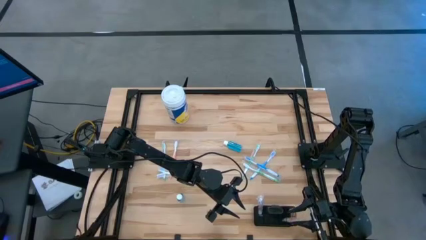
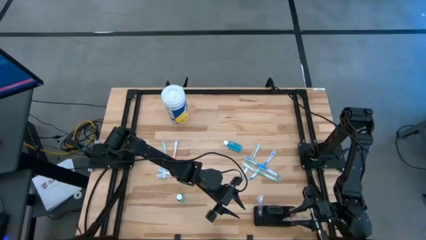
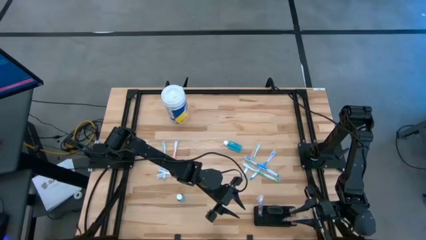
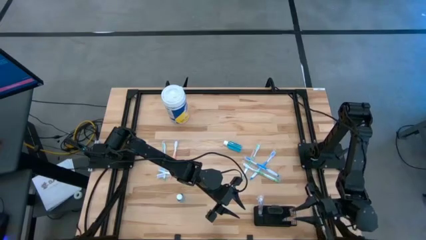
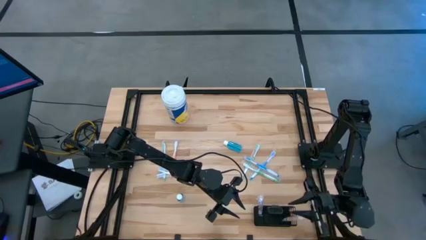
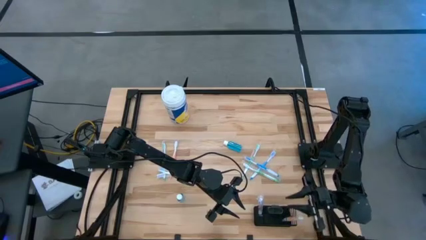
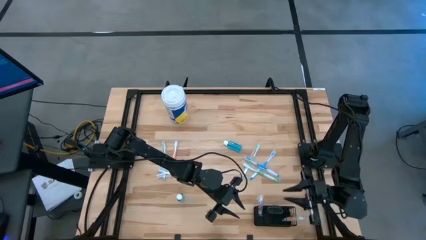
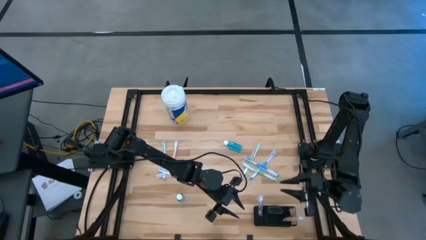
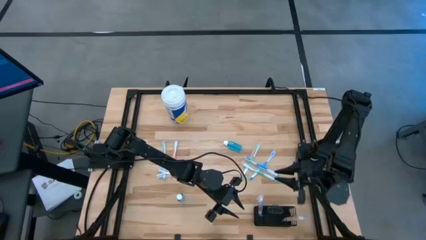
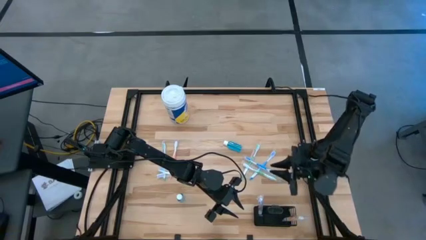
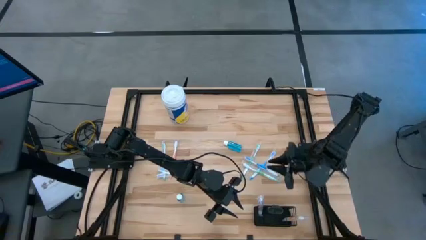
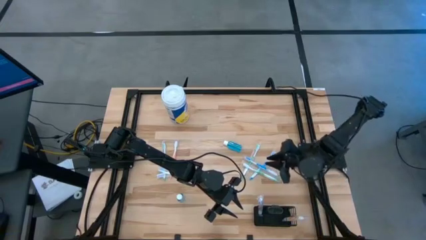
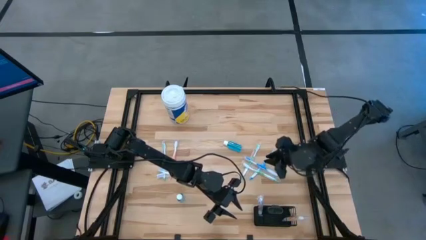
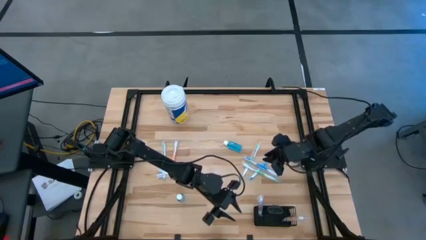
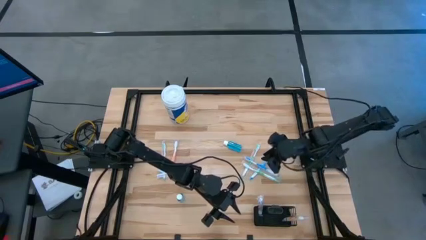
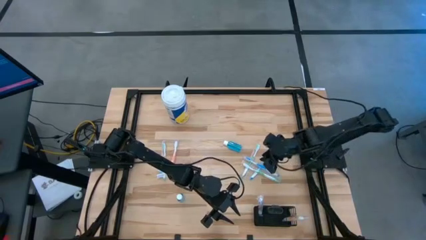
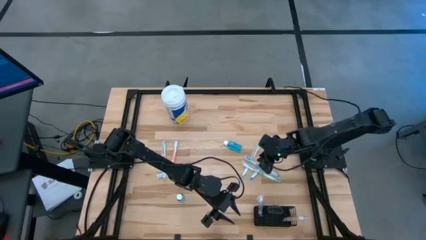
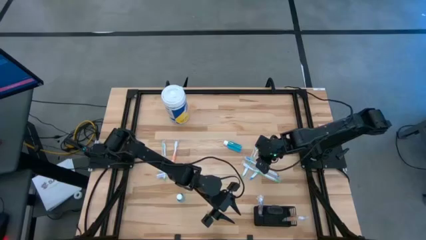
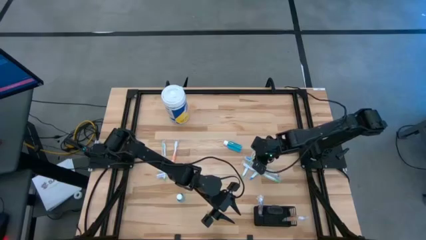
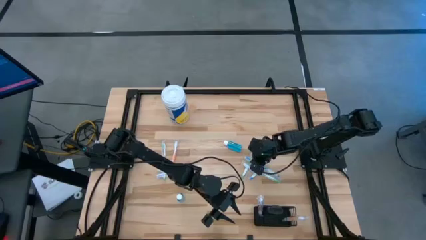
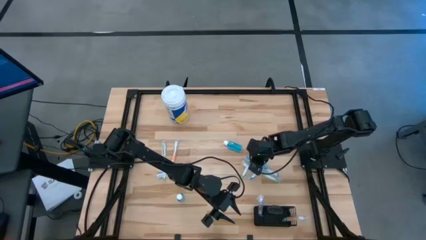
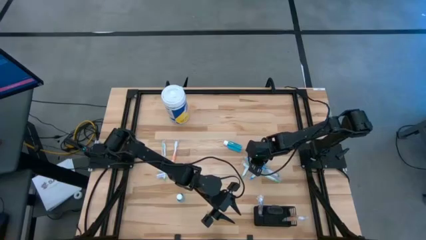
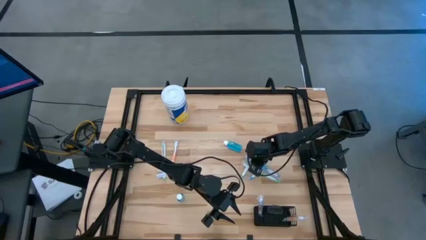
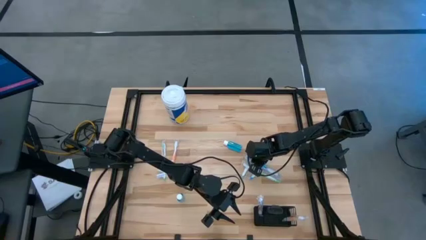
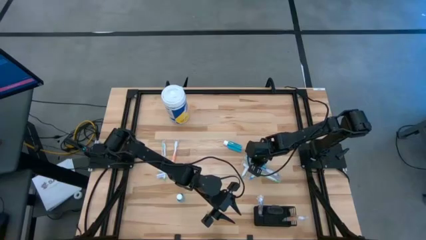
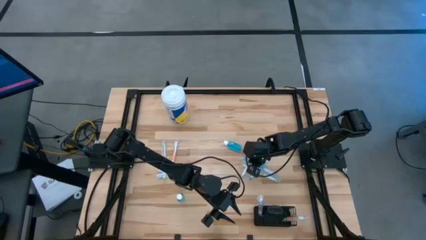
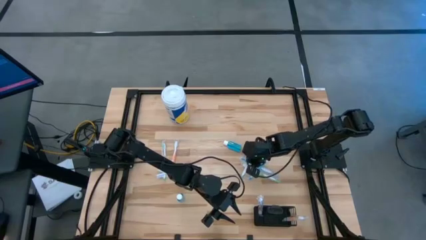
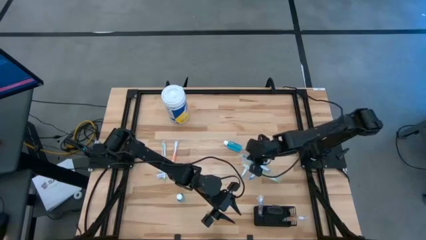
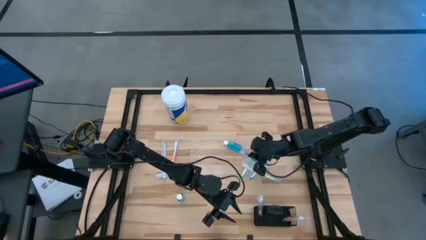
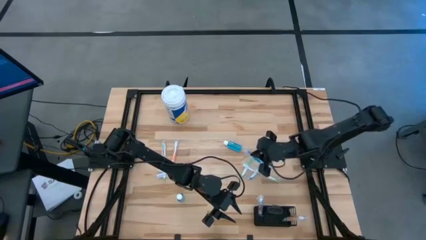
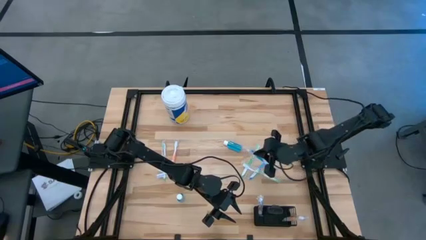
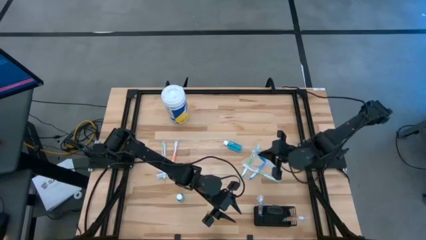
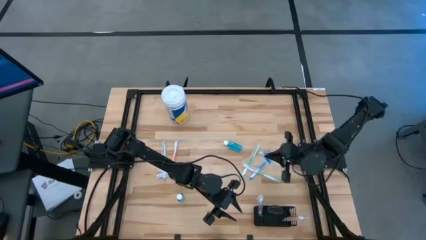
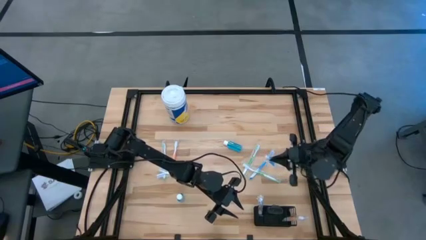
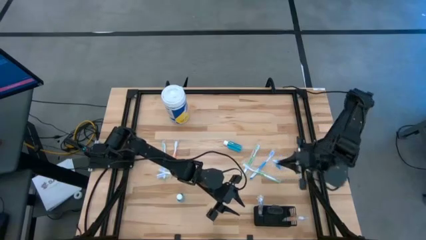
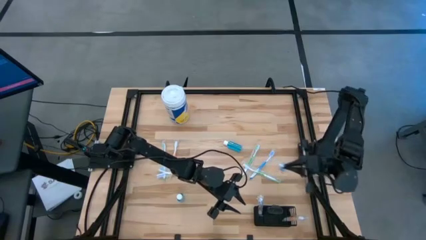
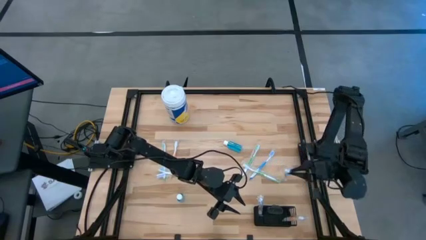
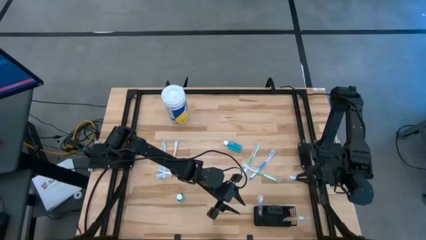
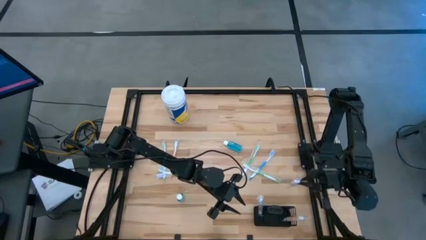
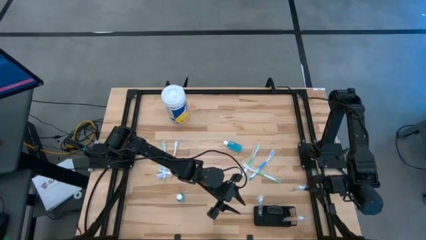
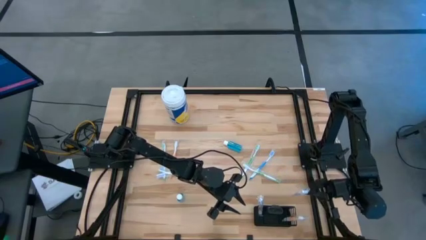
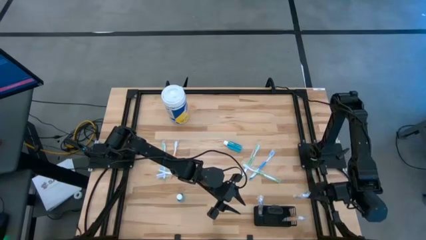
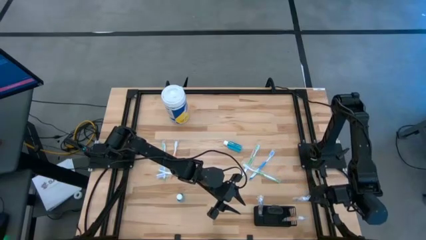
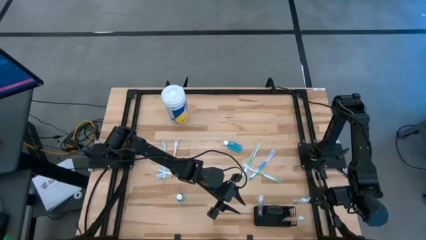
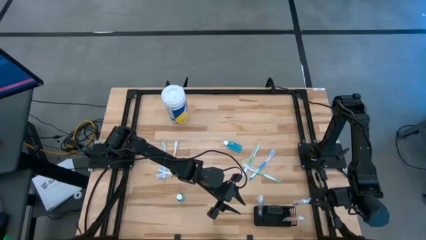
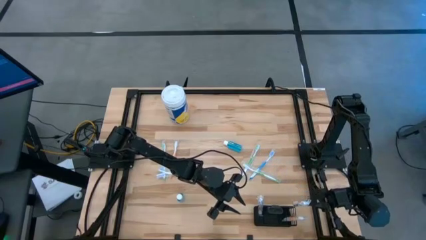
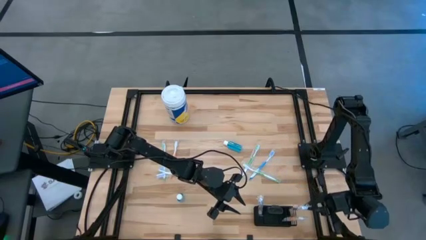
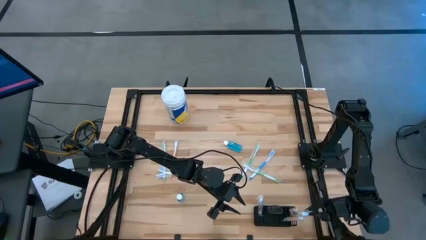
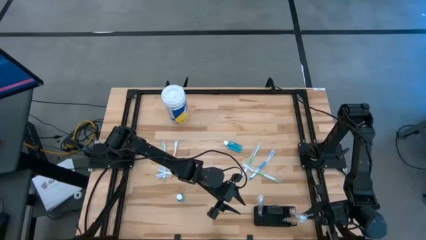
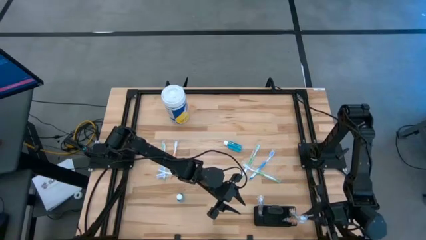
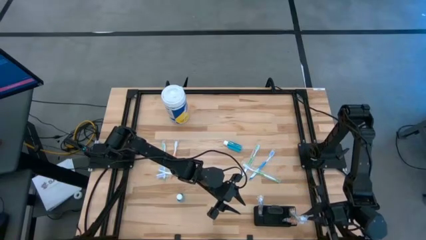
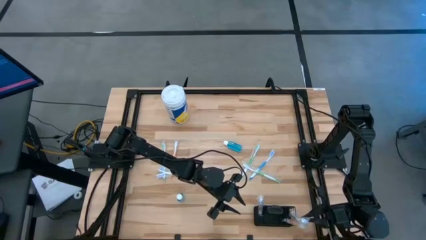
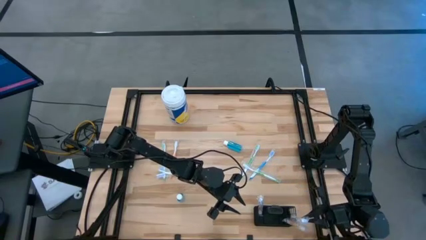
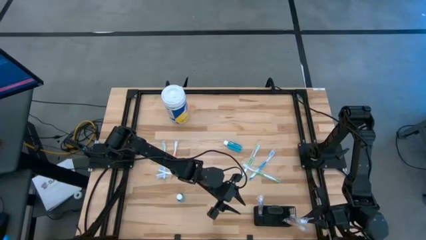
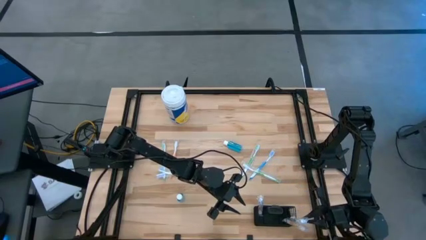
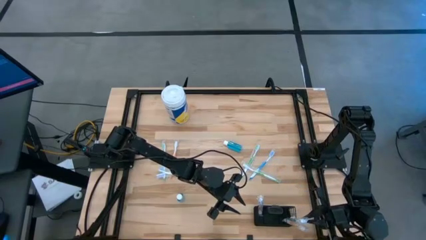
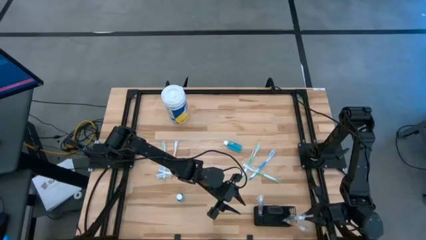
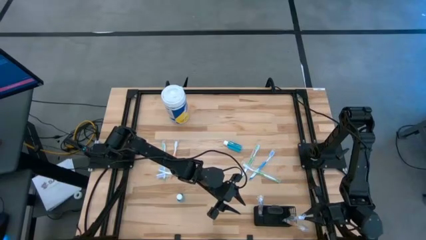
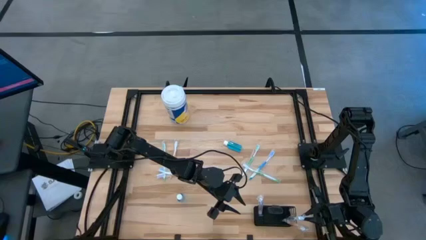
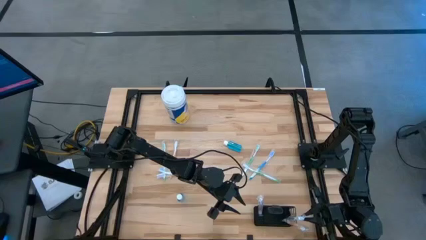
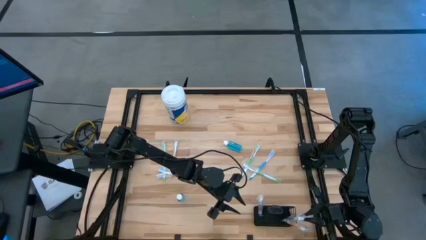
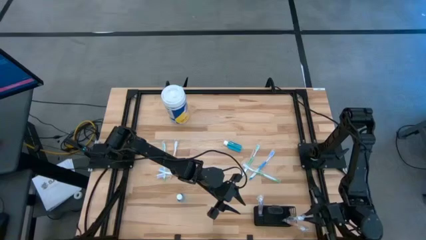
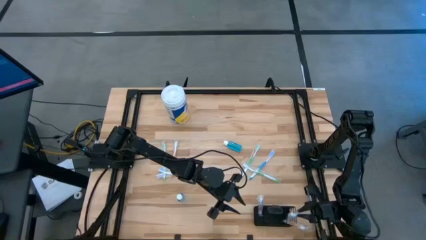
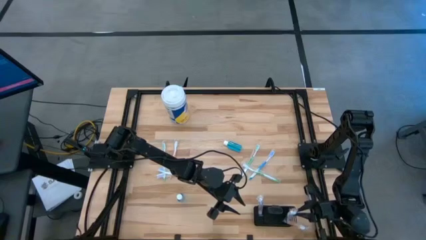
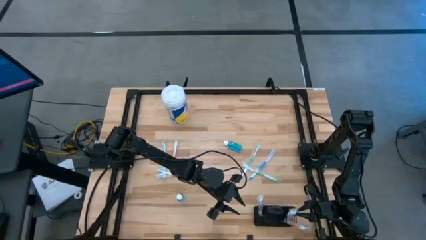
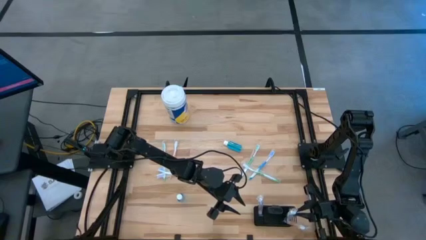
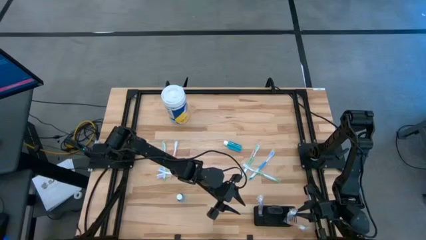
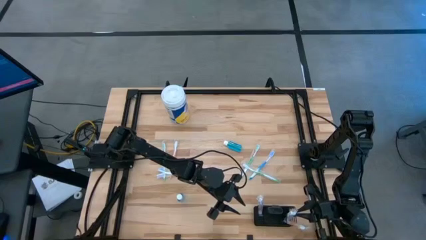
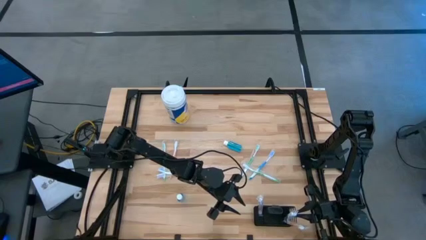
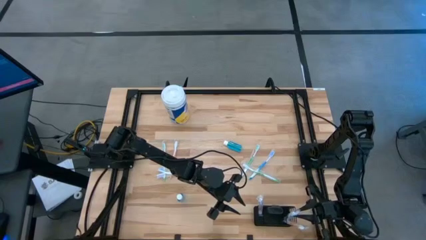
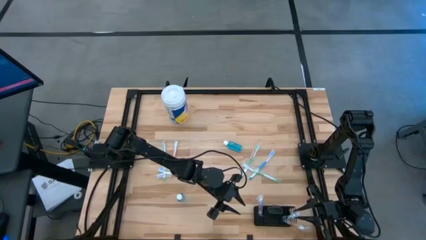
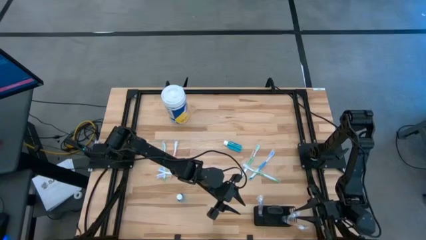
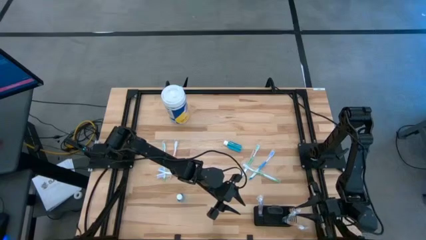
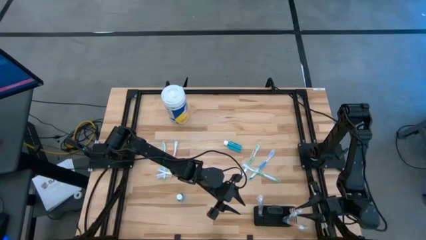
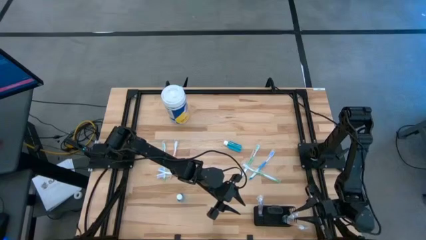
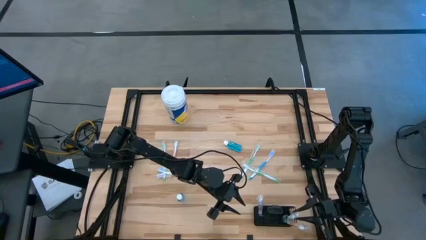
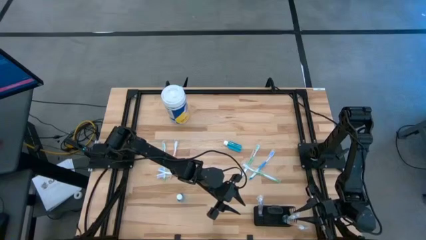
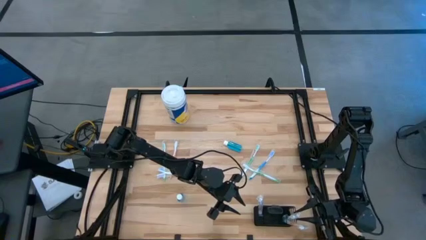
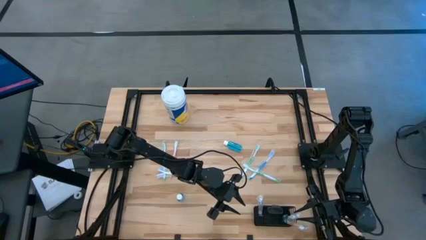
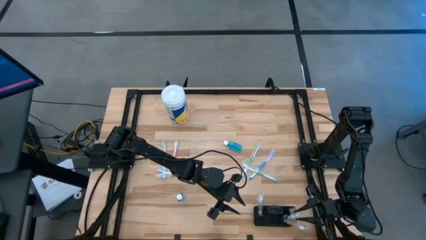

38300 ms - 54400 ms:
Task: Pick & Place toothbrushing station
Put the right blue toothbrush into the wire organizer
